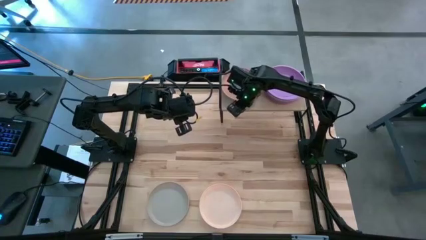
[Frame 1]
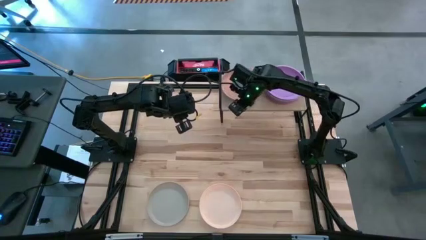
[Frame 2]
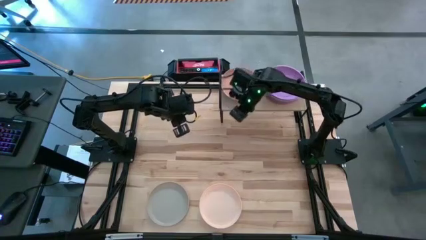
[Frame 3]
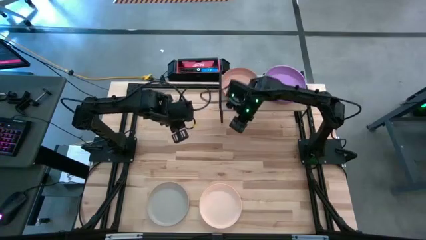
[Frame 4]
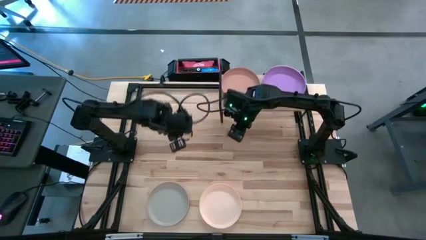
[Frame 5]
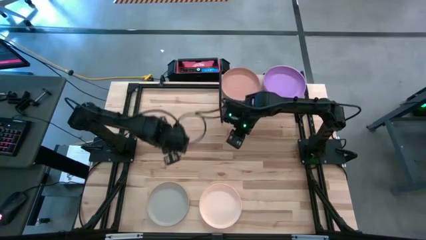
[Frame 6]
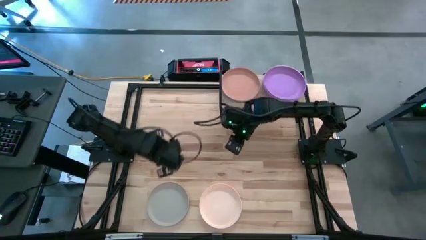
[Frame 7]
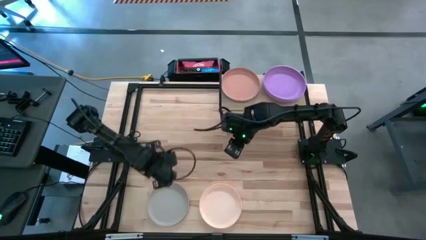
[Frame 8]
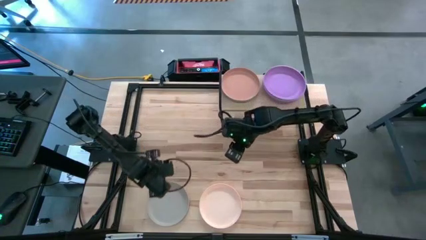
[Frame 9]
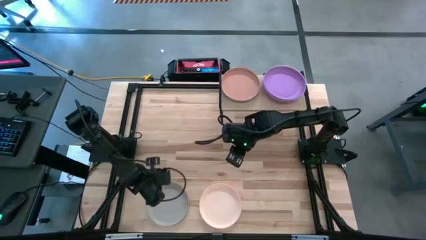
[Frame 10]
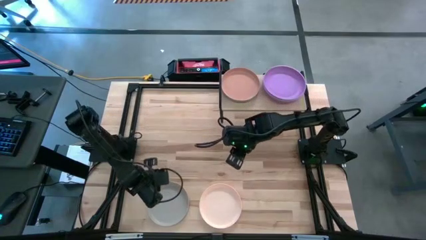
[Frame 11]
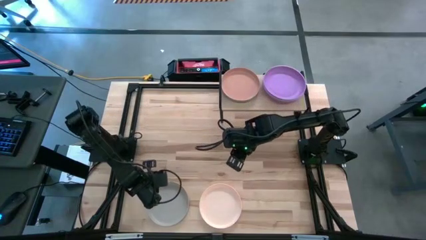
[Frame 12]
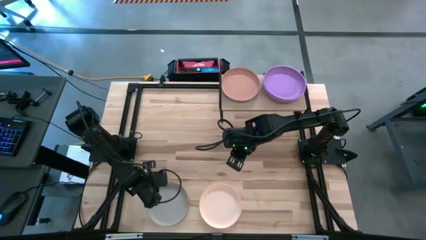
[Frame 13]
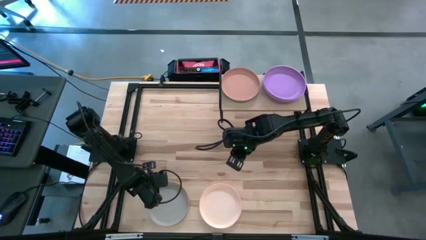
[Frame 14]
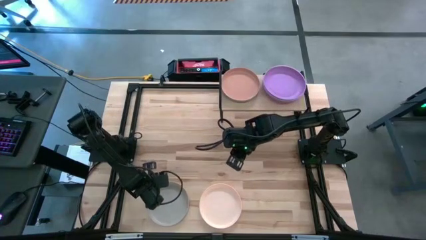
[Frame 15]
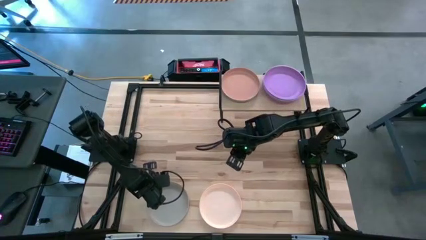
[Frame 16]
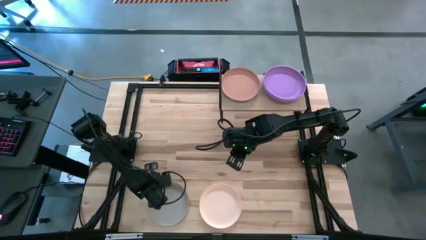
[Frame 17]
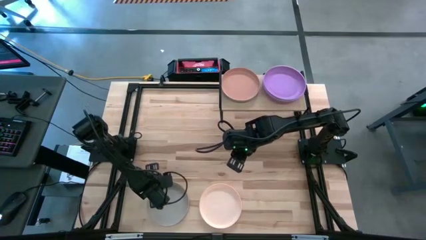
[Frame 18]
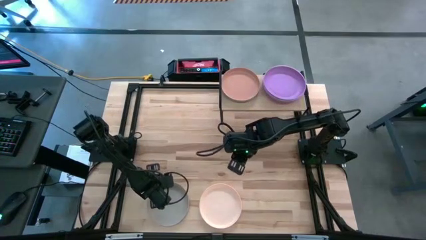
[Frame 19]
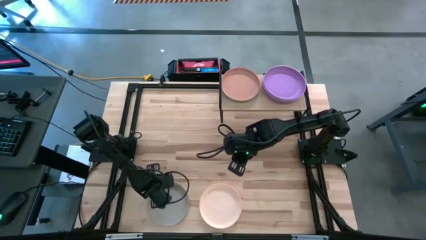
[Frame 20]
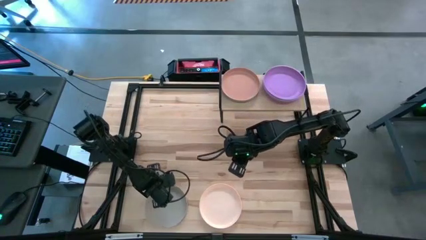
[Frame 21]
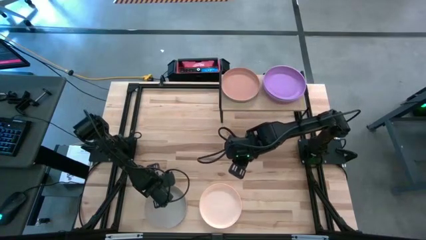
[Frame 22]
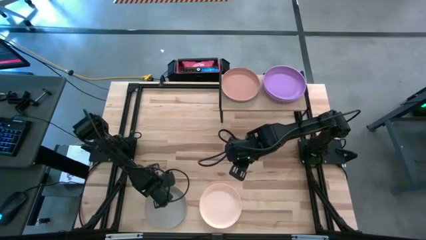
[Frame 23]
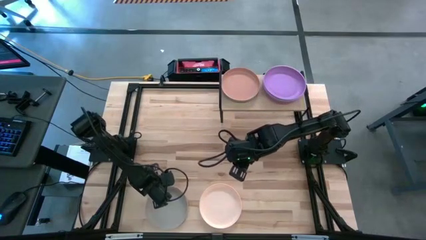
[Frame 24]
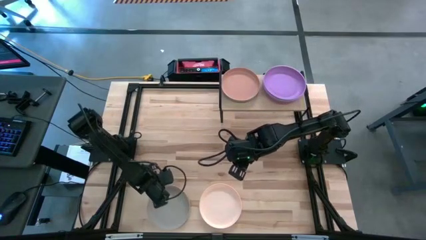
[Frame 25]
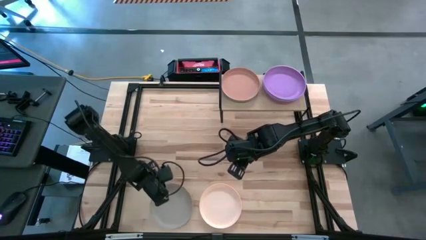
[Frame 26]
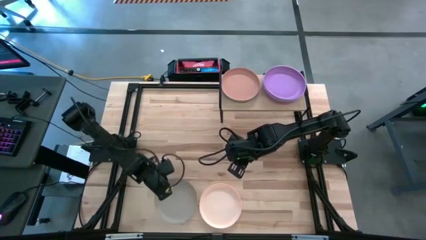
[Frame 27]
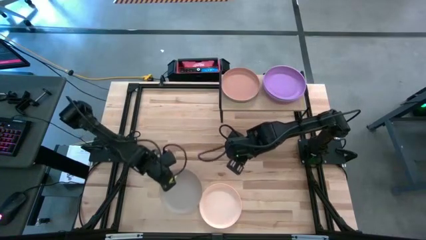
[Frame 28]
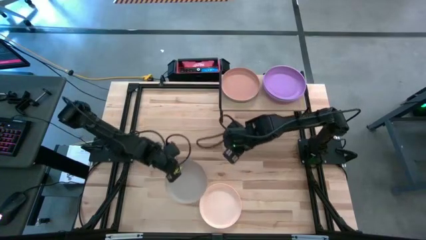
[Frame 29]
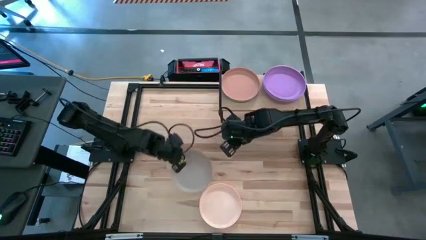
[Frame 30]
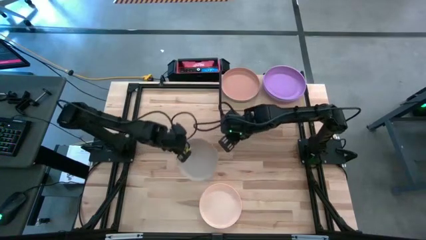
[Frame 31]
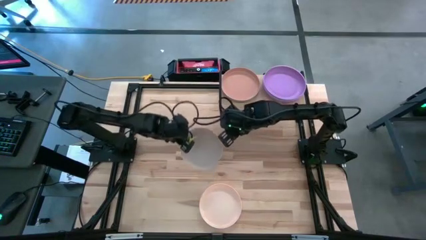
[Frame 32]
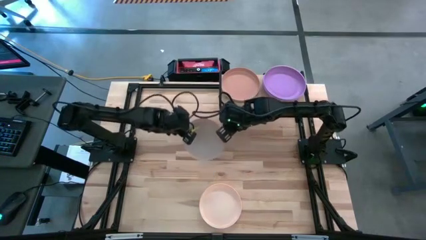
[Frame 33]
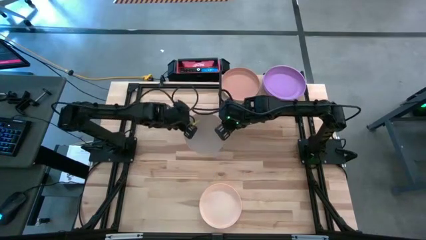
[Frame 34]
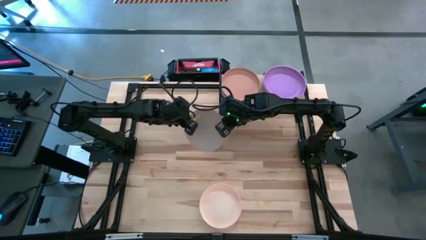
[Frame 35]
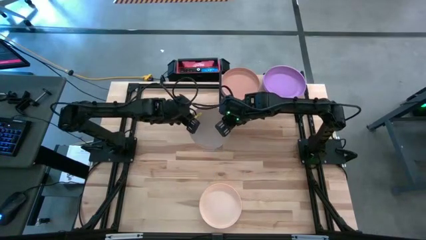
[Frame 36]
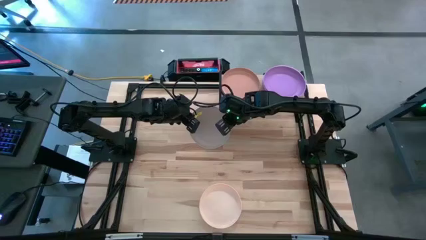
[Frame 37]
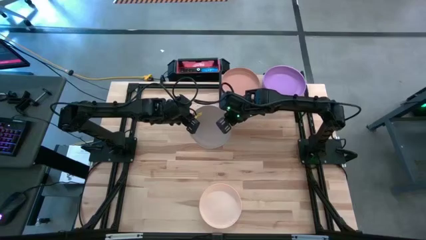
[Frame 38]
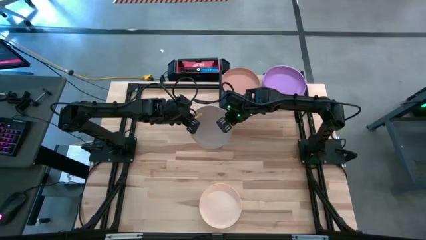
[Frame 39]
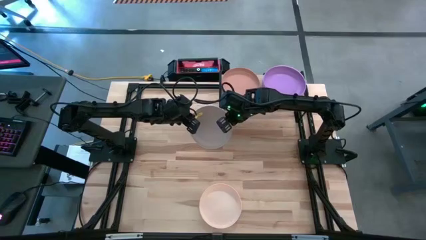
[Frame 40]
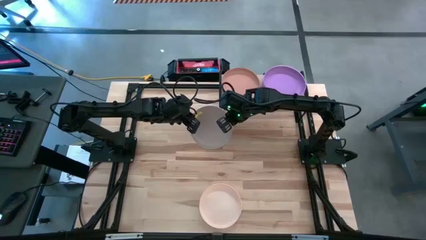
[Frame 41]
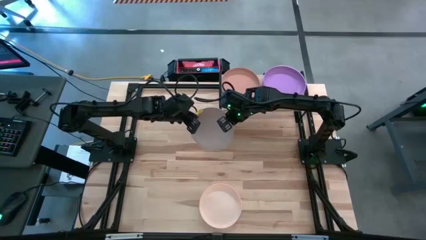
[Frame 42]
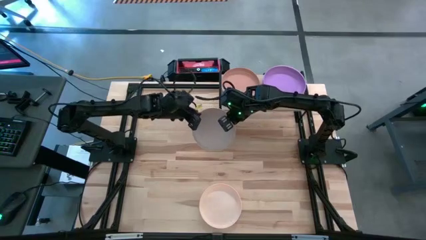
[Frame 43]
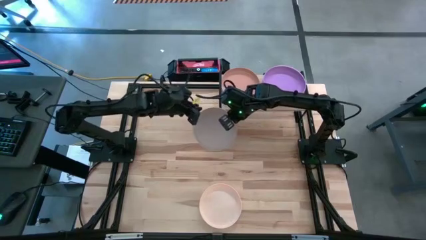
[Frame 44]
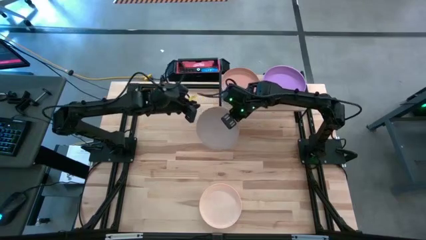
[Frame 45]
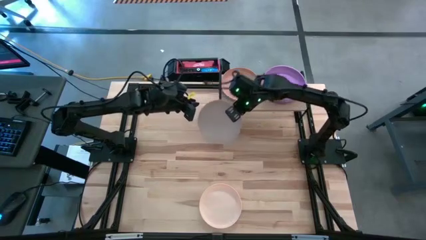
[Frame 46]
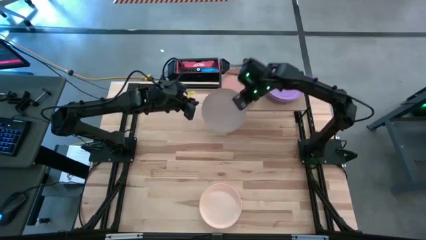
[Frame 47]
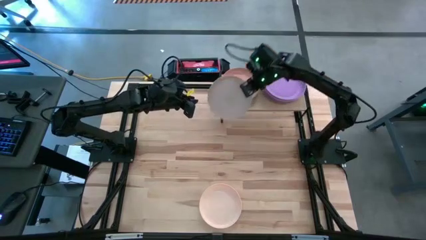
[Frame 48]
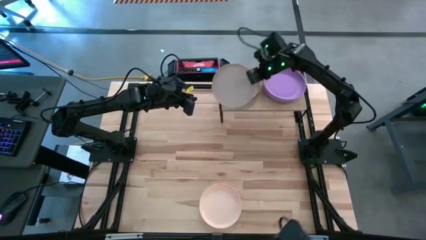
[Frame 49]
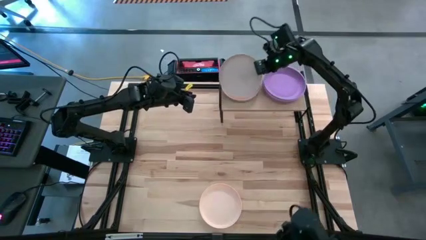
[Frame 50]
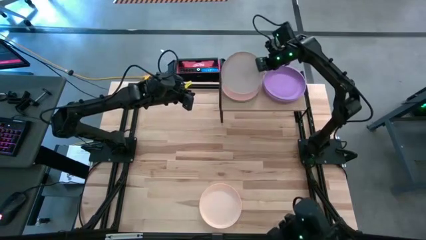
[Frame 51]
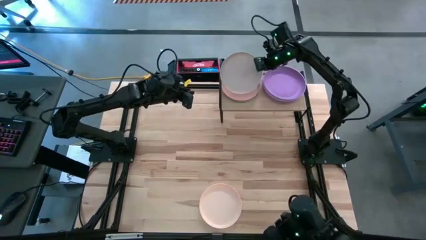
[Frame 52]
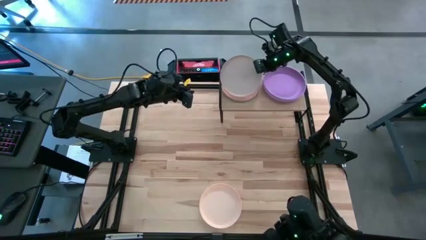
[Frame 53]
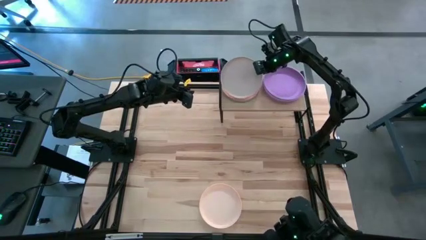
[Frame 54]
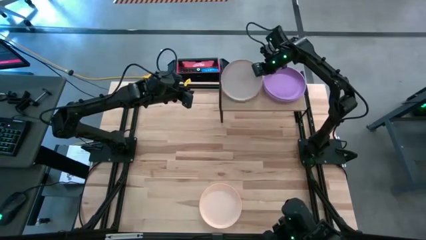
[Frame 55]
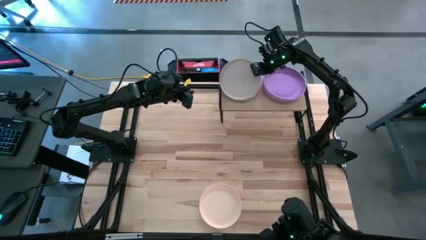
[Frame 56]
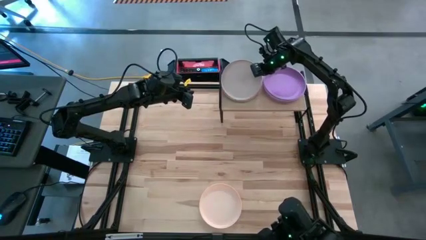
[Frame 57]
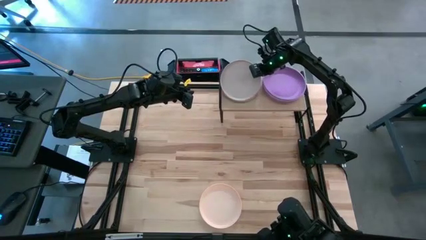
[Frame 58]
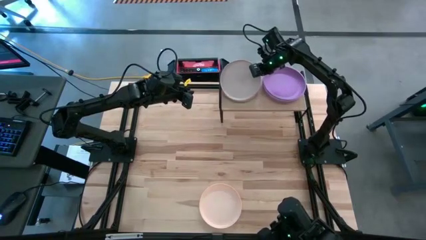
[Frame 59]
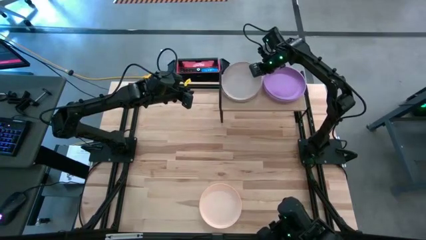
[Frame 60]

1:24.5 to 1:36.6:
Task: Place and stack plates onto a shelf
Stack the gray plate on top of the brown plate on the shelf

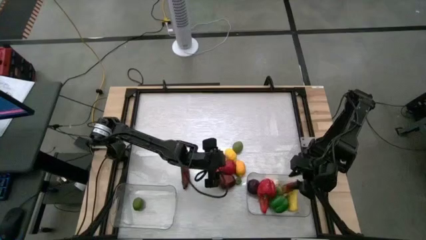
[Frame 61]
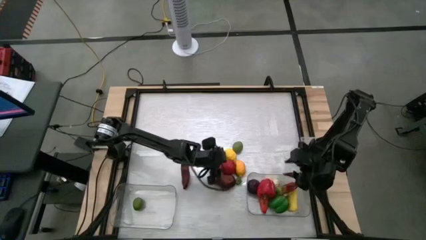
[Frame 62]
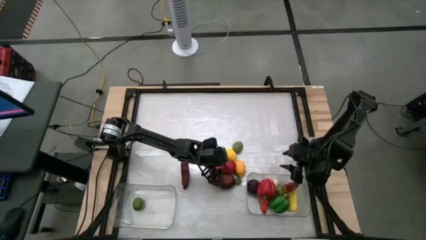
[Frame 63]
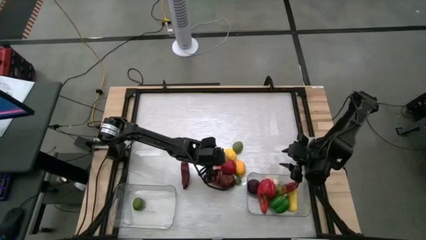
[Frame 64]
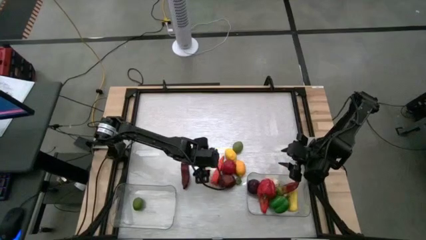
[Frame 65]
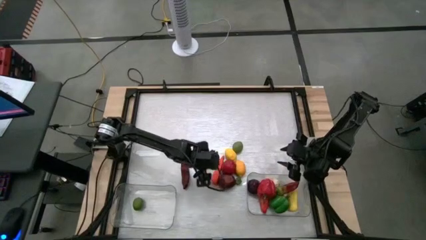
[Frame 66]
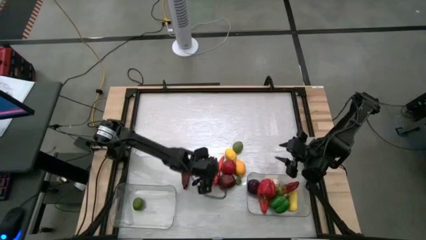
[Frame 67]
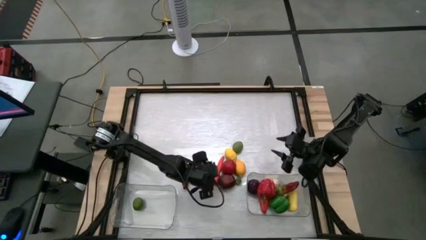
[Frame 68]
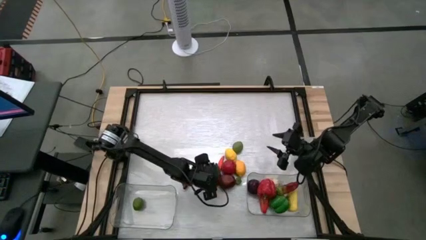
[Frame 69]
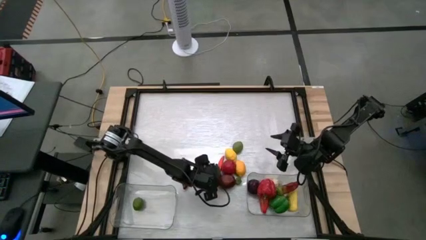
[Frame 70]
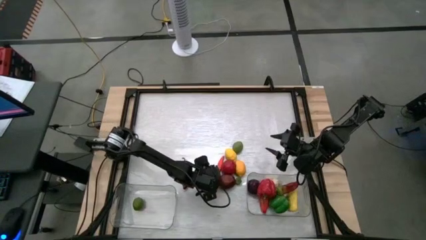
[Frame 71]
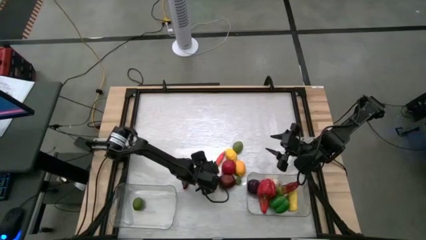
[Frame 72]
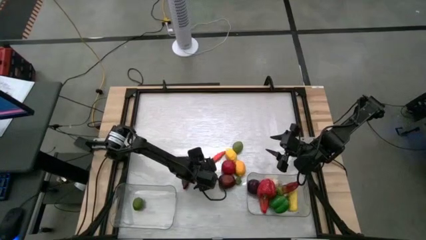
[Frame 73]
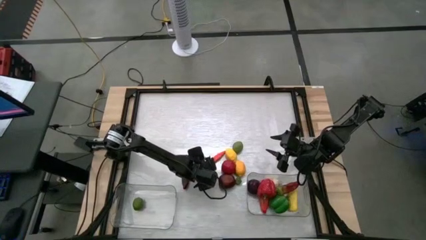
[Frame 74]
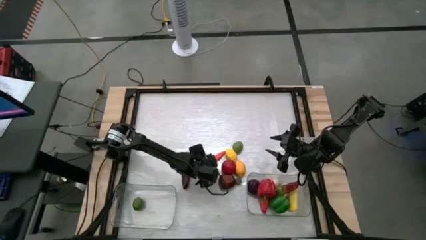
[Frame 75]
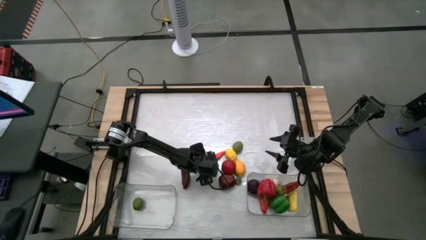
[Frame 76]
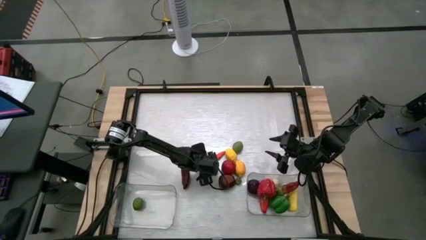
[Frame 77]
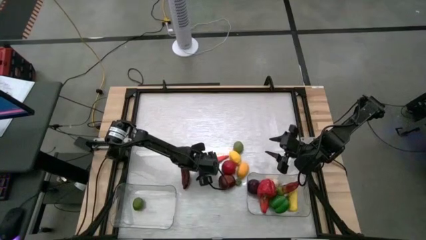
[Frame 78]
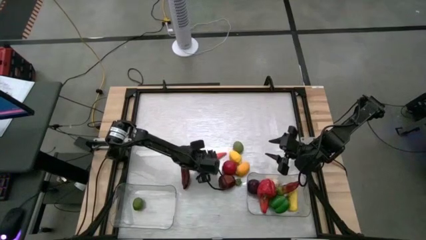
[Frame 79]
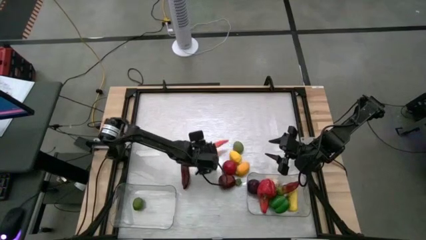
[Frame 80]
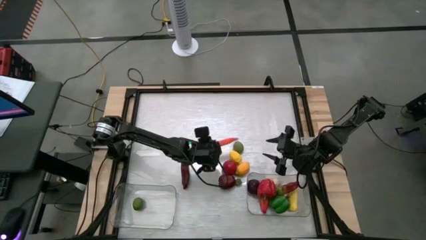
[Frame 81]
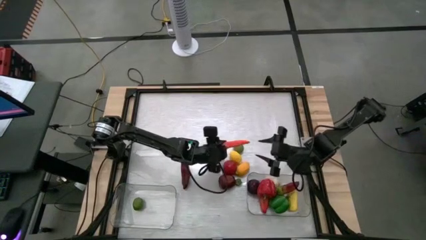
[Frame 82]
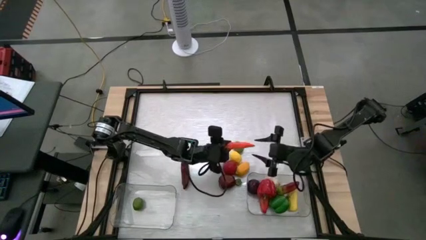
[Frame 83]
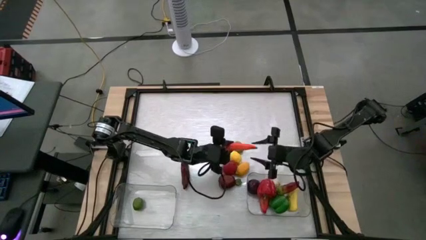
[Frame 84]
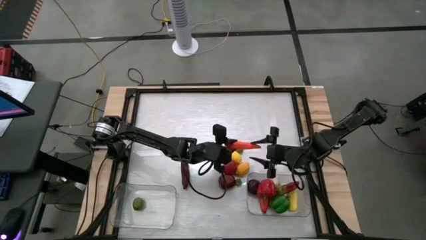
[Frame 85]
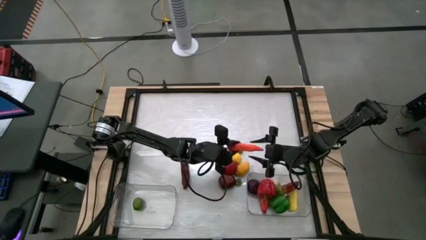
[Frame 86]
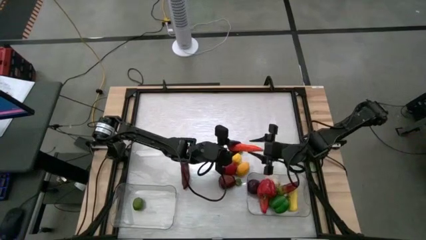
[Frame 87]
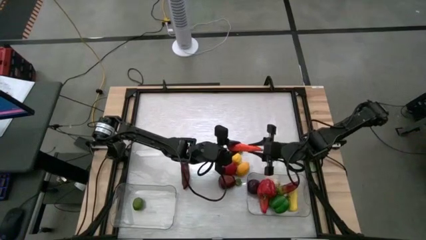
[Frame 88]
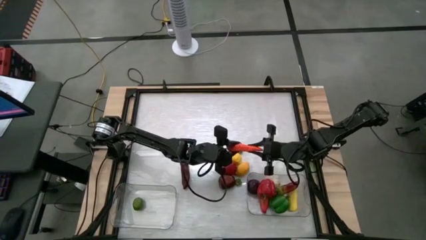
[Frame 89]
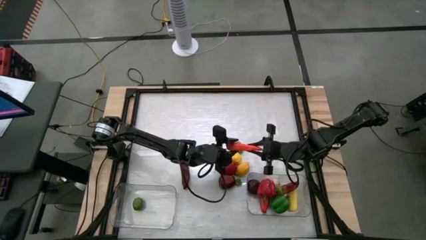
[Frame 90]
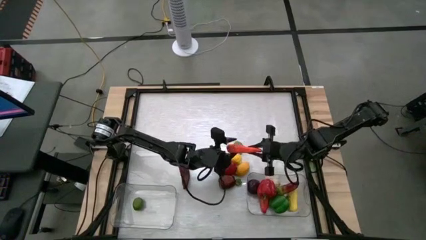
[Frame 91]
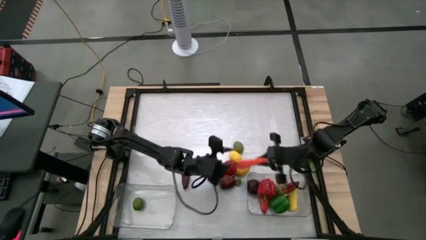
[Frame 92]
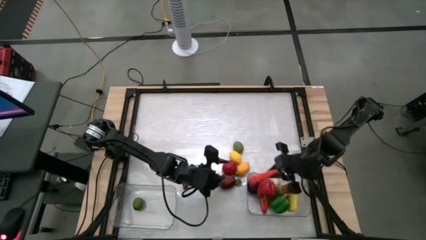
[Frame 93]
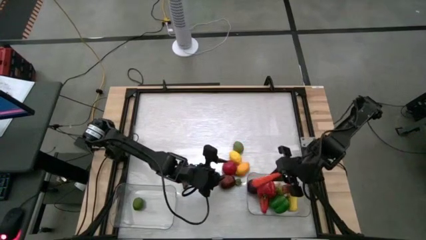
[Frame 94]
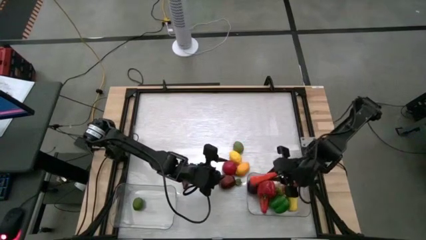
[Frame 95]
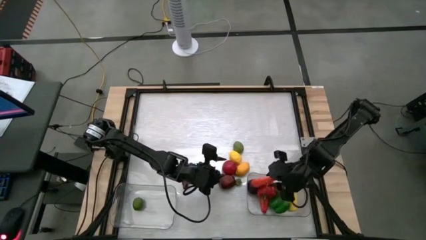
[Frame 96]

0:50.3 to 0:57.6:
Task: Sort produce into baskets
Put the carrot into the right transparent bin
